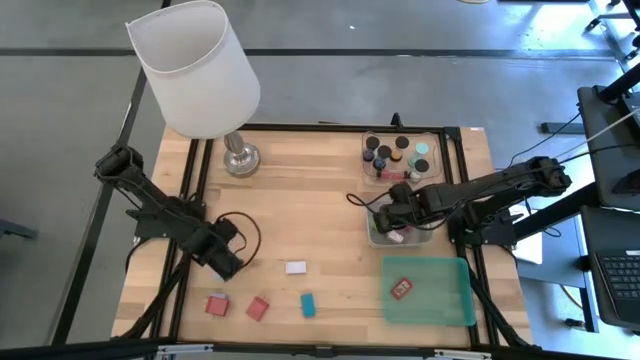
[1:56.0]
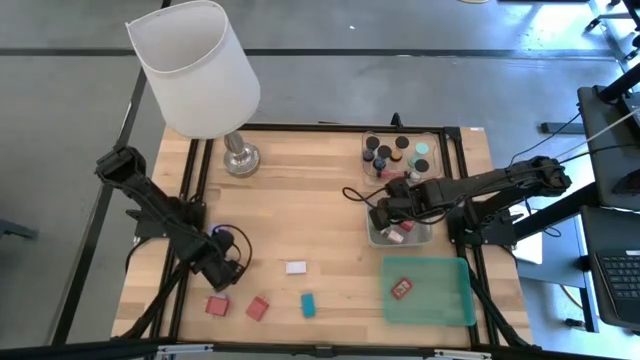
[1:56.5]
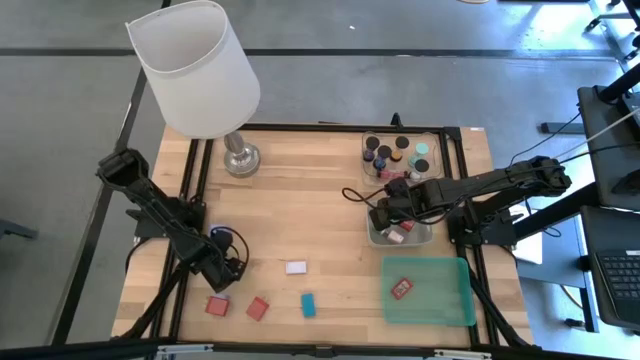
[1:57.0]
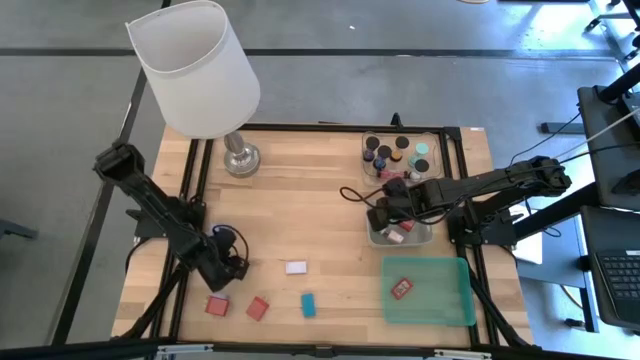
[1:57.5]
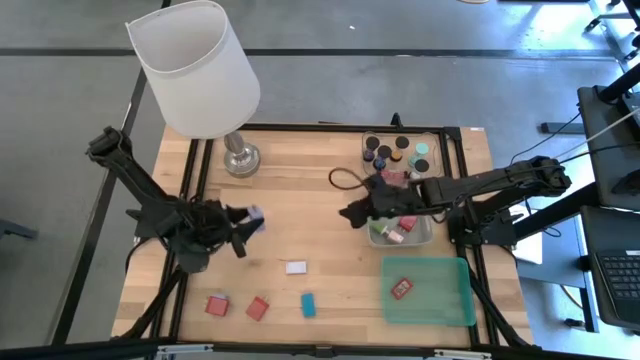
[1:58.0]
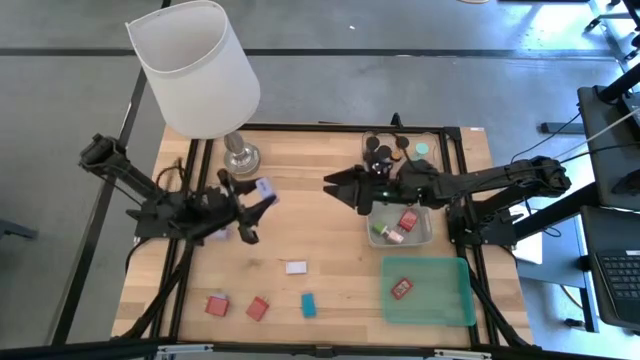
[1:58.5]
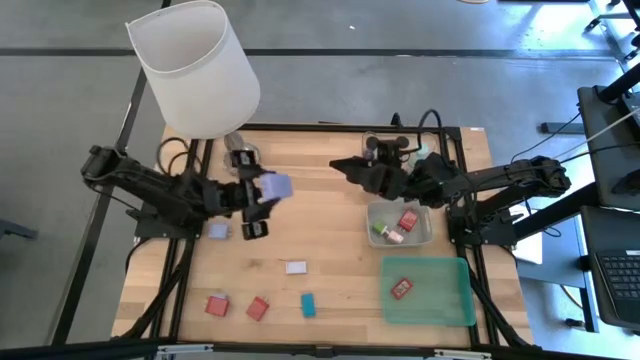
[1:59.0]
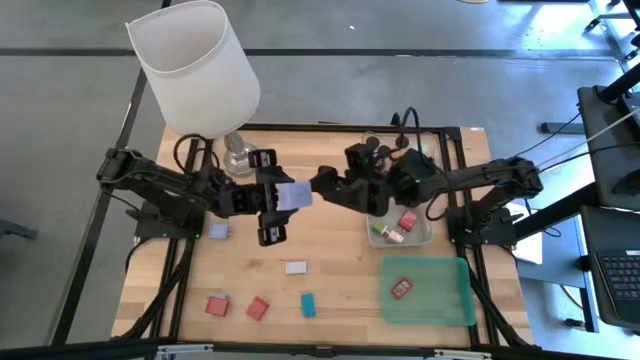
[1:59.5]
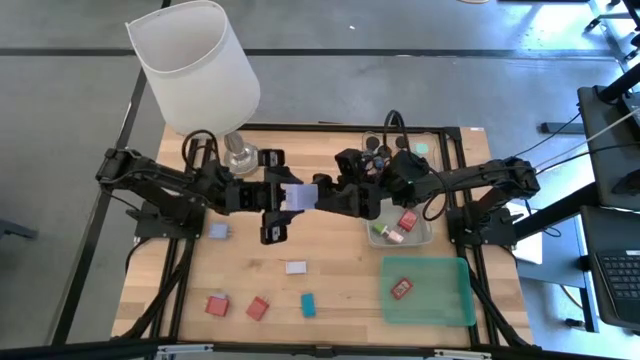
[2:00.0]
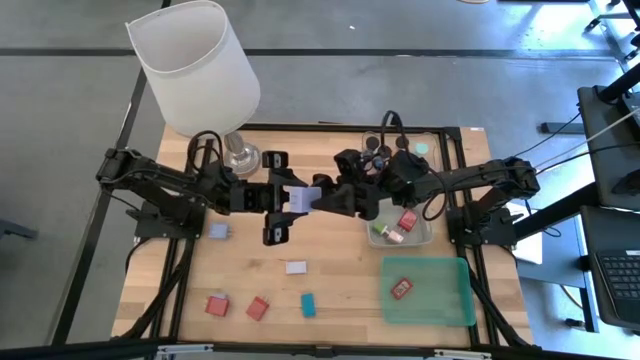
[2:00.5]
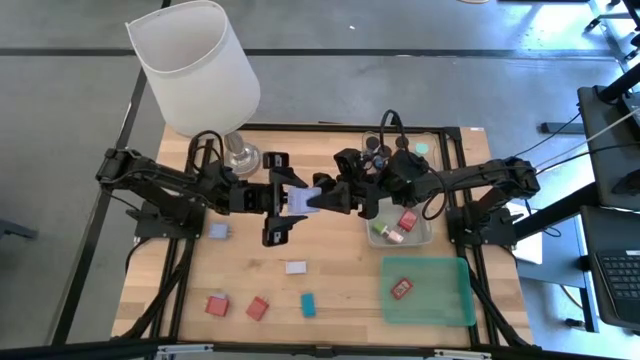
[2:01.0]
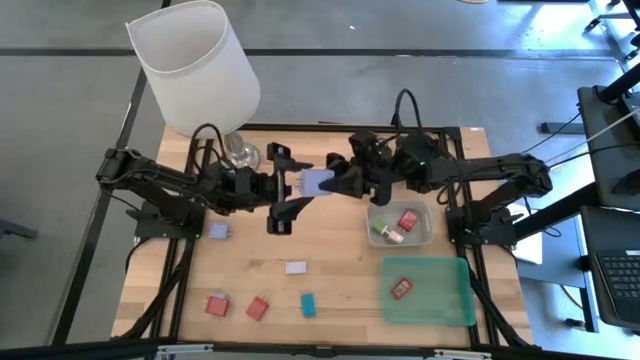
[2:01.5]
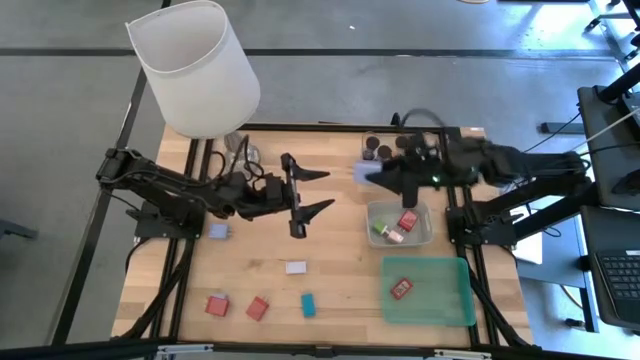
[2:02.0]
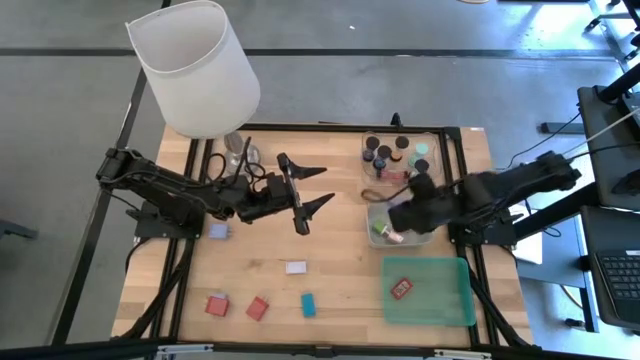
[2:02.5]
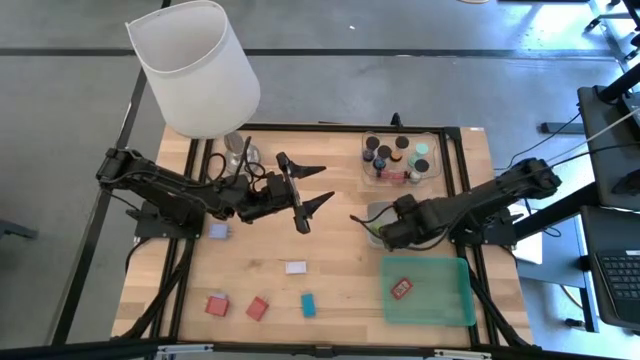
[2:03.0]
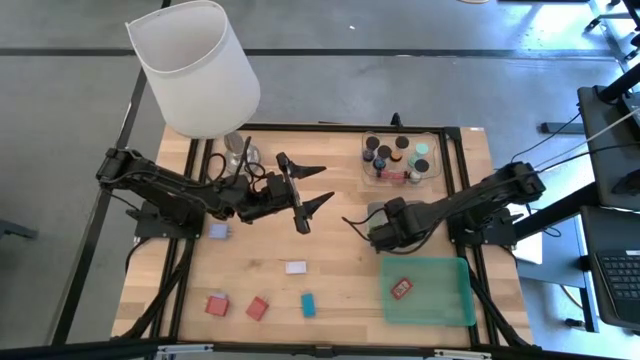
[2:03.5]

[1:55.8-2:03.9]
Task: Pick & Place Office items
Put the middle purple charger adapter into the white bin

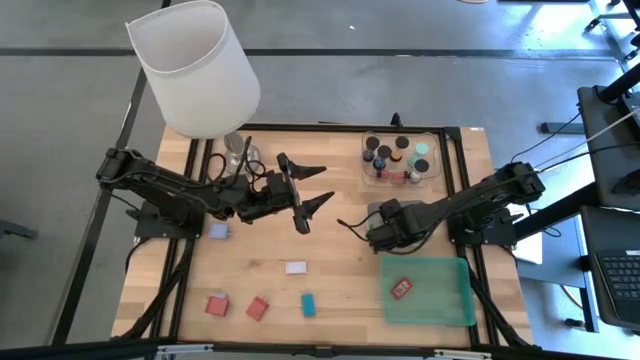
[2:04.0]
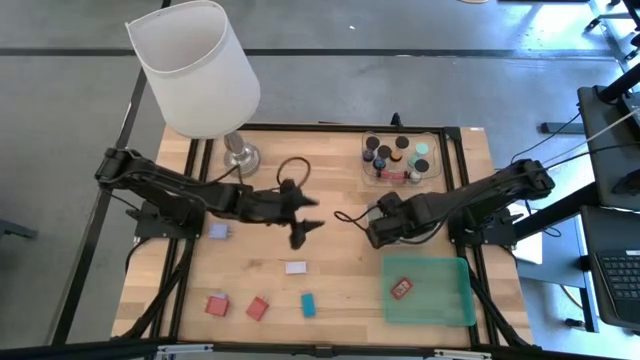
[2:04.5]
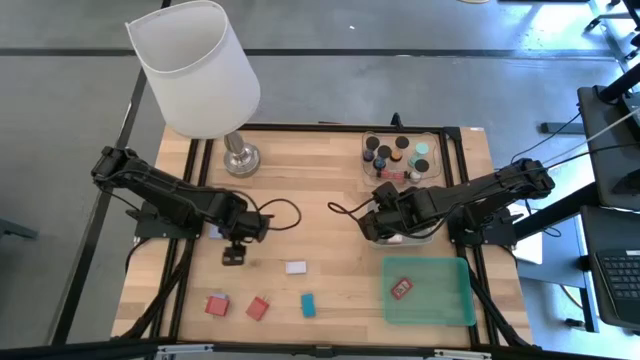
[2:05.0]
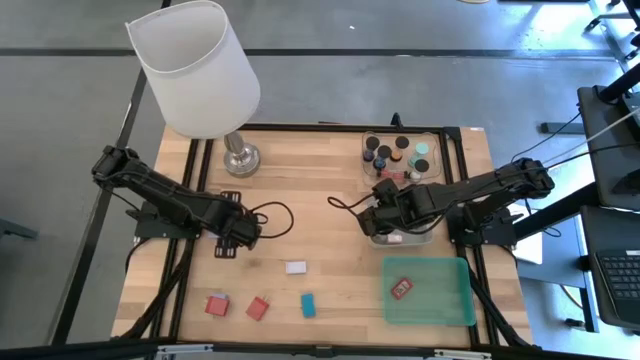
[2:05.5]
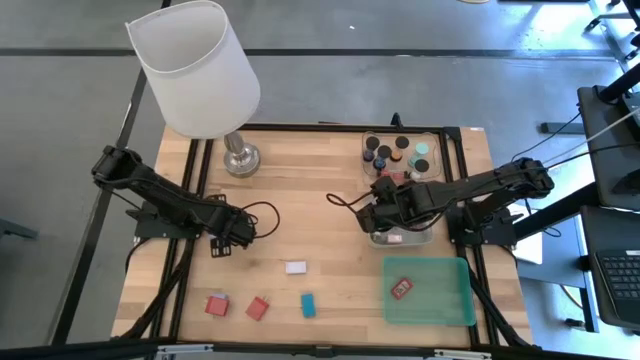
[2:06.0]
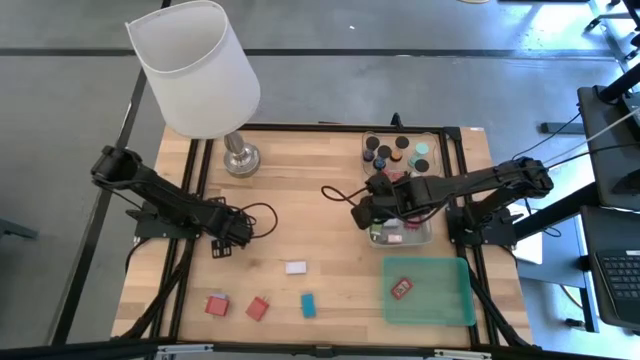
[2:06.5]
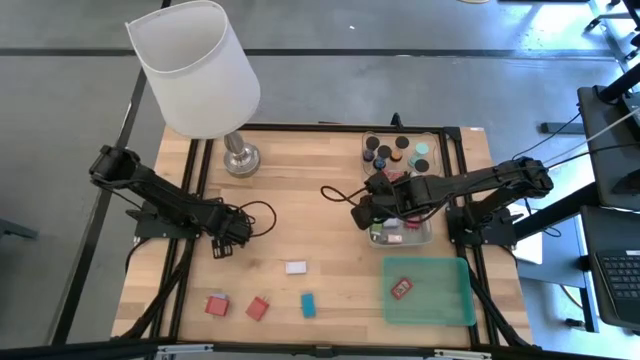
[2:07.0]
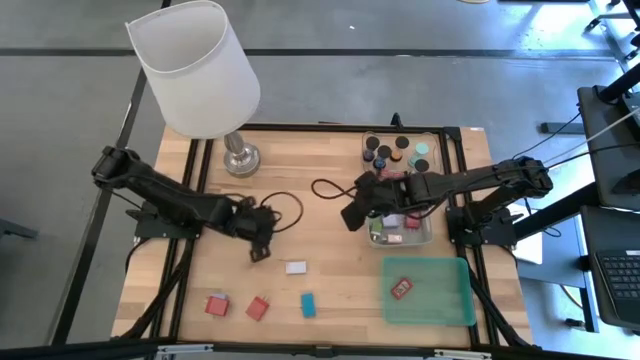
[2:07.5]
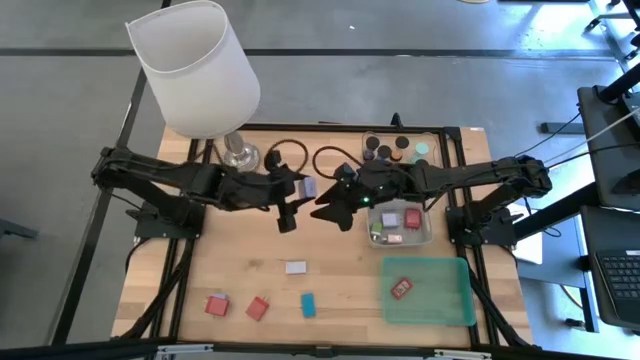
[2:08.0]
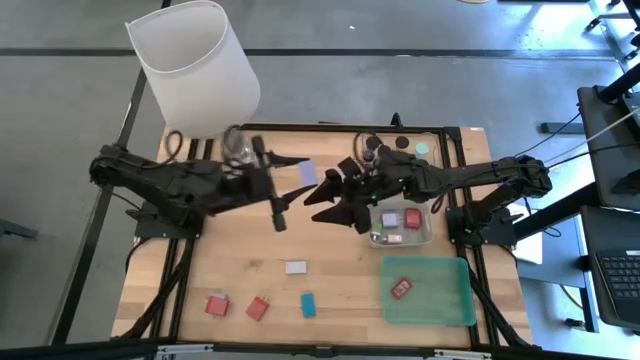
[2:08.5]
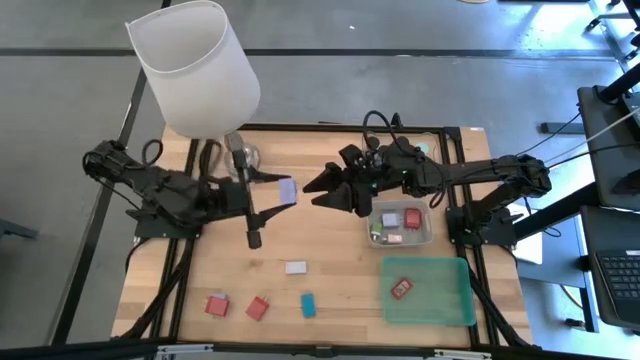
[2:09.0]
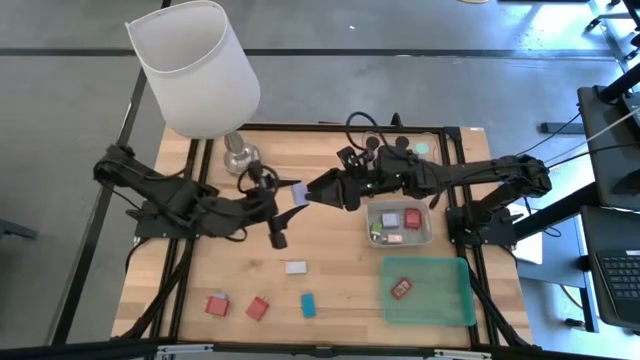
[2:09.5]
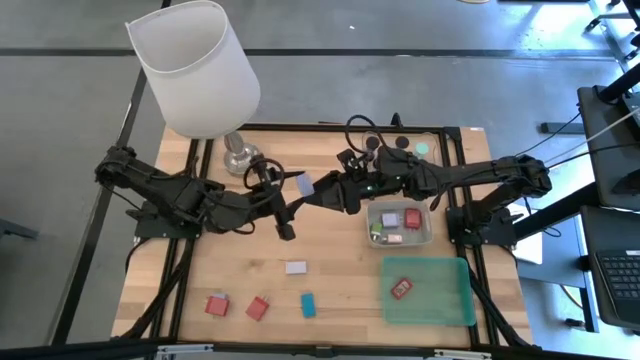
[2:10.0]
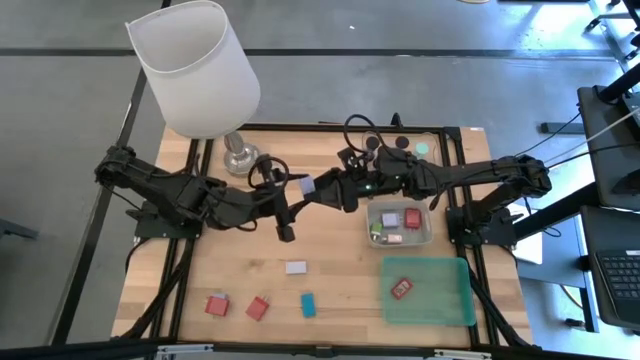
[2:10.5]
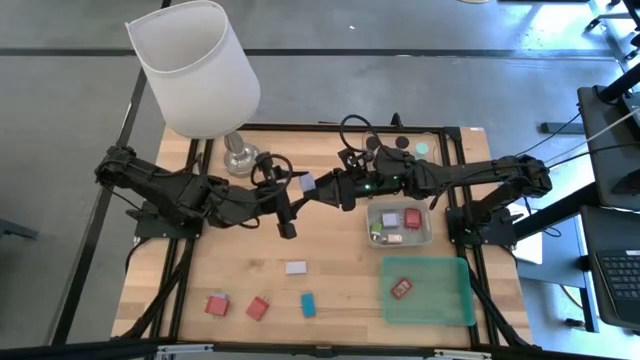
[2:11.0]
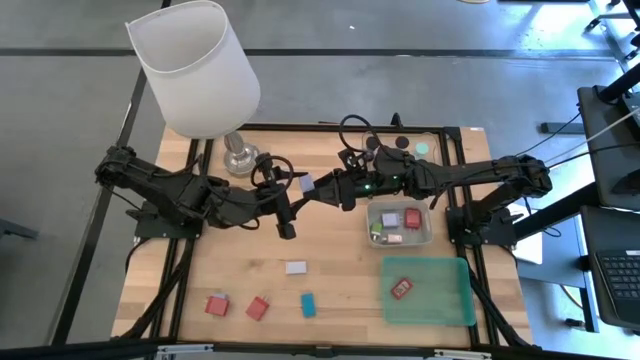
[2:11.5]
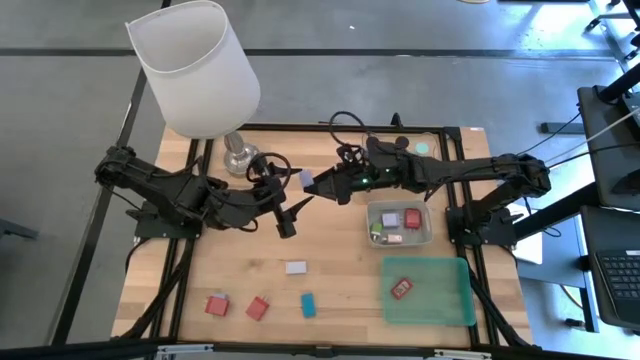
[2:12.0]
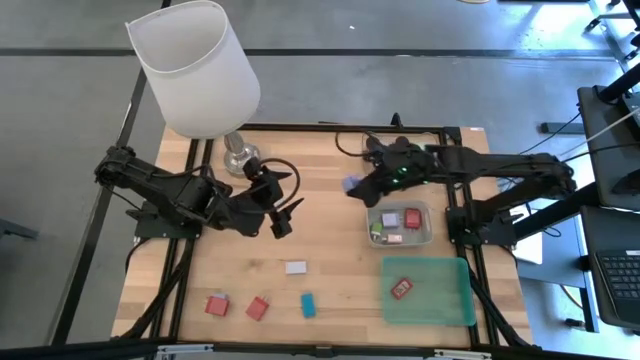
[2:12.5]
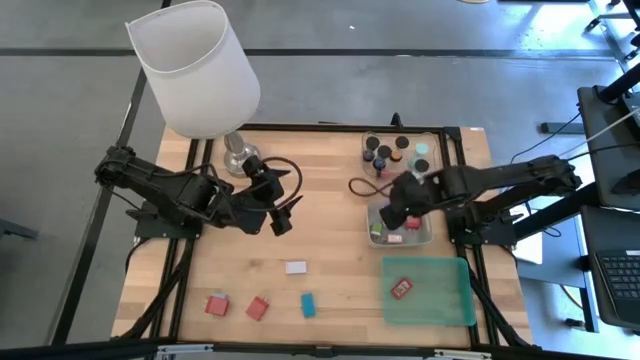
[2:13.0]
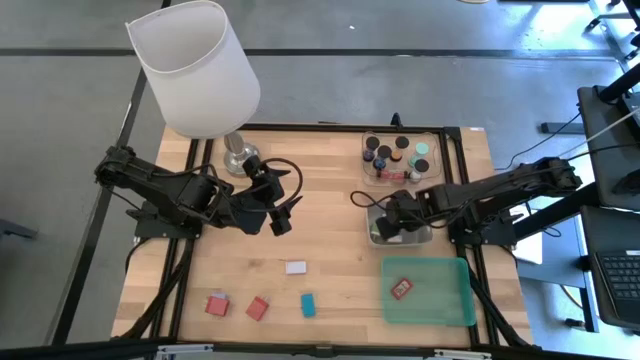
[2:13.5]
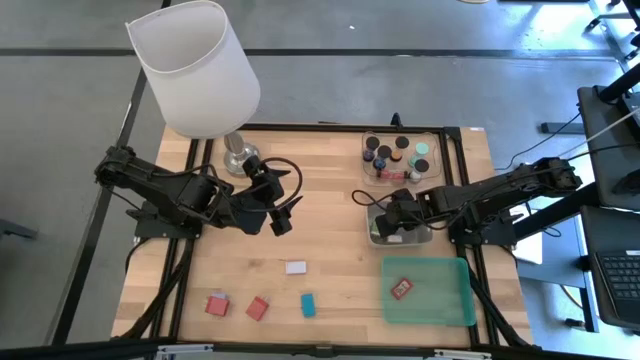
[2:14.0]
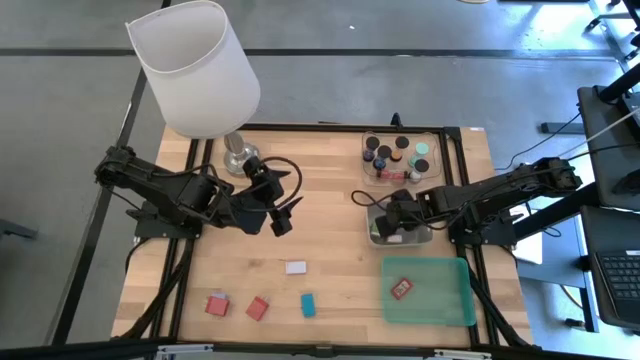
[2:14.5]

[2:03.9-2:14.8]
Put the top purple charger adapter into the white bin

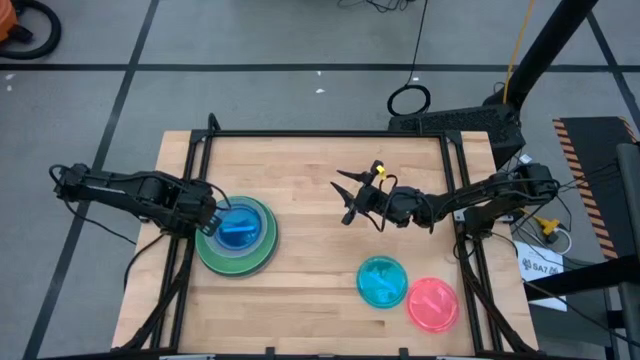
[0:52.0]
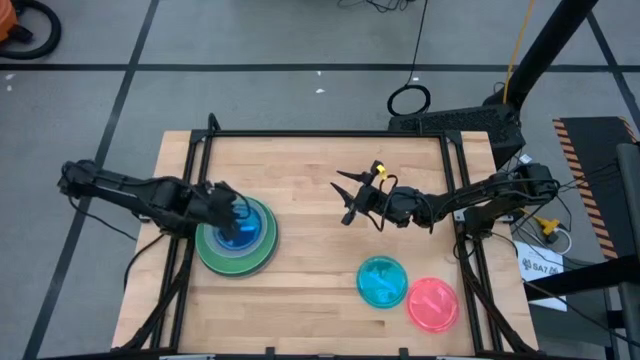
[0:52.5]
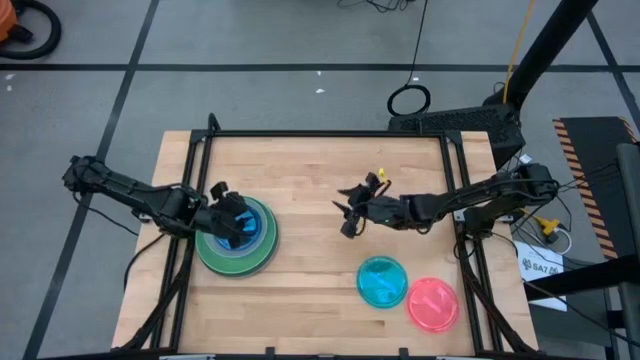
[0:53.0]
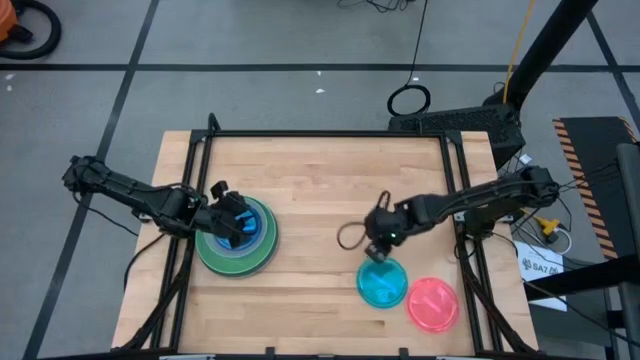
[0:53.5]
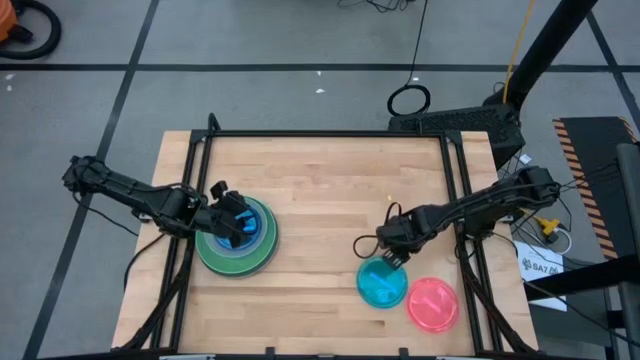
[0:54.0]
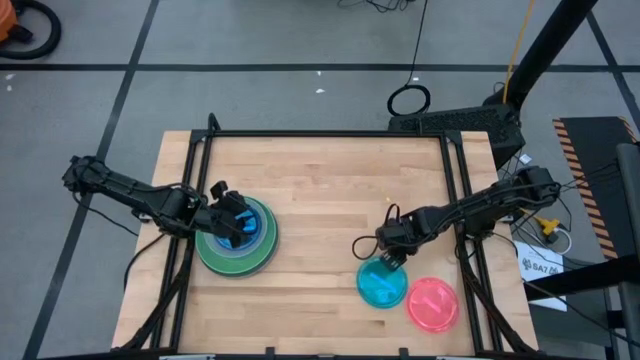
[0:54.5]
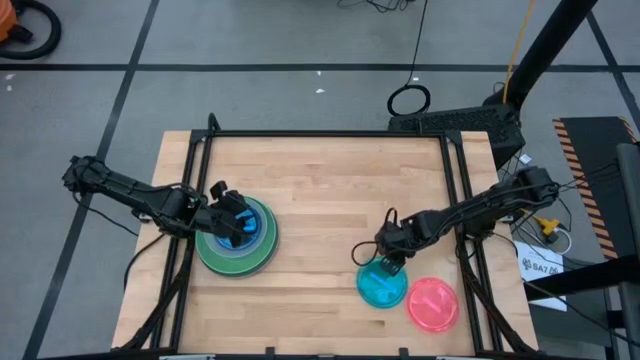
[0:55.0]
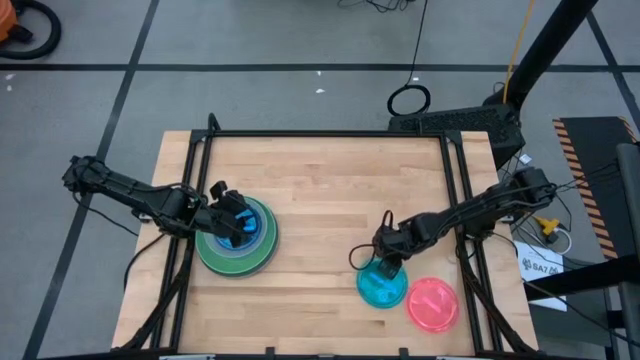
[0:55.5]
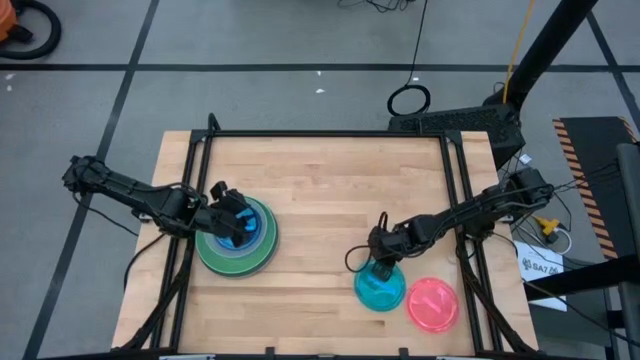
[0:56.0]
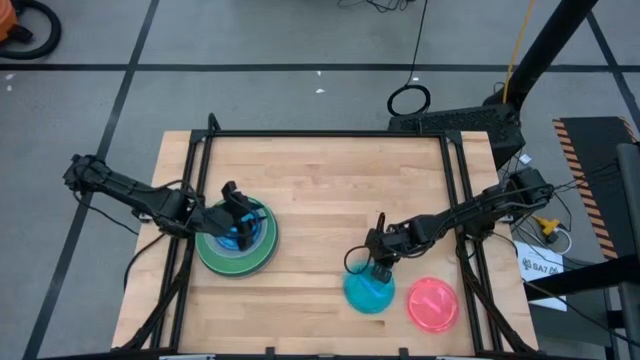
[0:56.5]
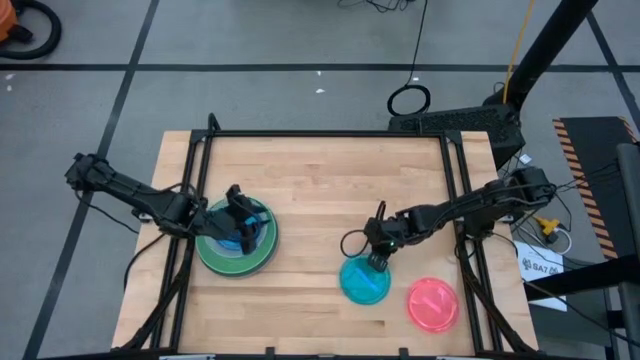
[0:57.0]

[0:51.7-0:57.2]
Task: Stack plastic plates
Stack the light blue plate on top of the light blue plate
